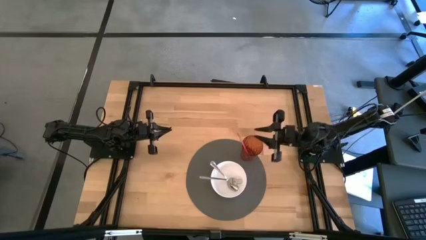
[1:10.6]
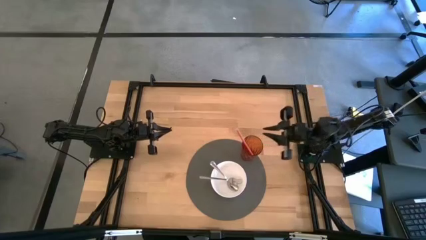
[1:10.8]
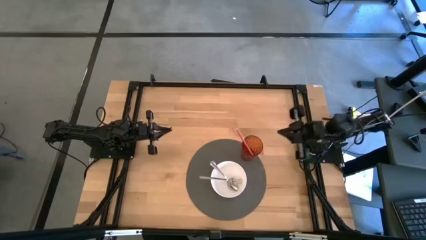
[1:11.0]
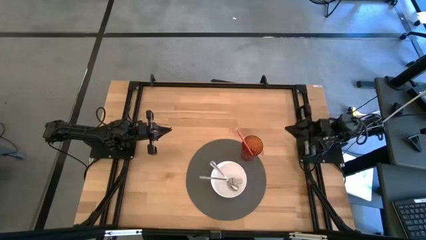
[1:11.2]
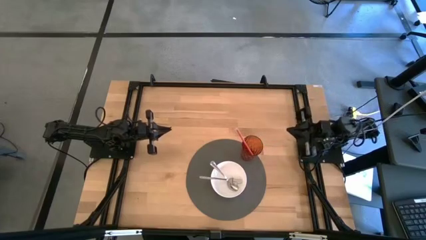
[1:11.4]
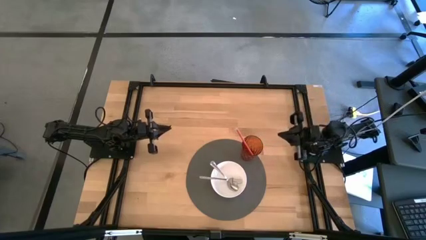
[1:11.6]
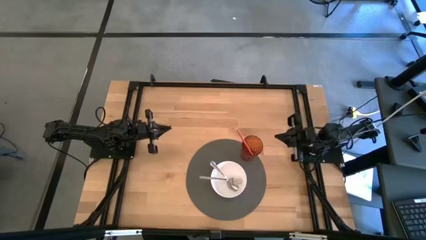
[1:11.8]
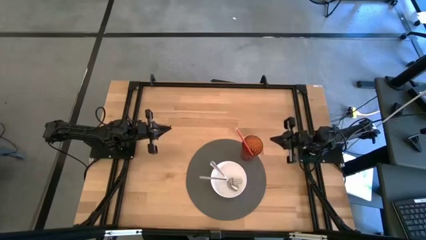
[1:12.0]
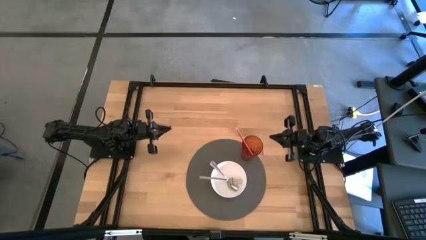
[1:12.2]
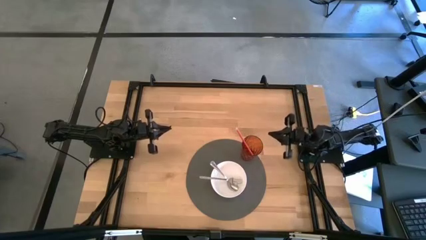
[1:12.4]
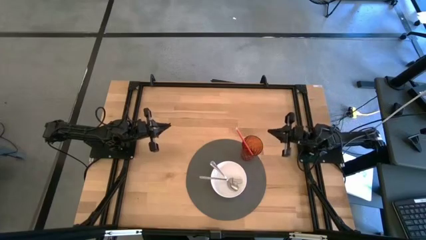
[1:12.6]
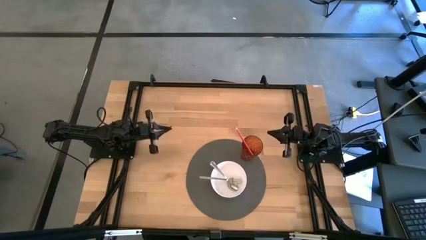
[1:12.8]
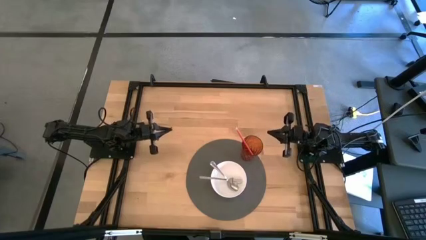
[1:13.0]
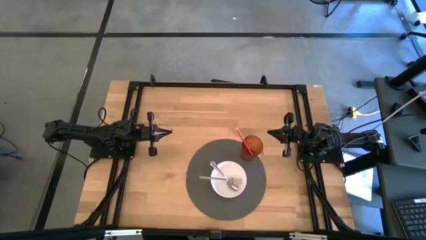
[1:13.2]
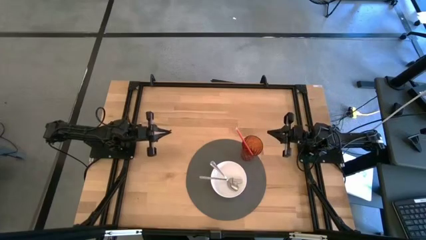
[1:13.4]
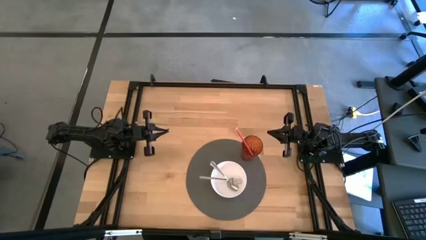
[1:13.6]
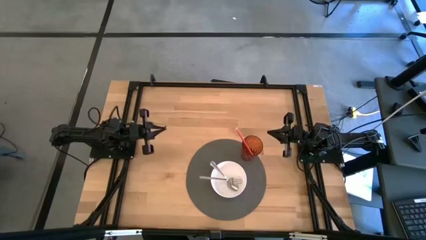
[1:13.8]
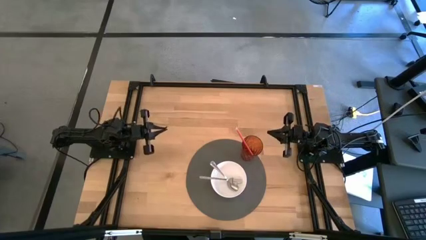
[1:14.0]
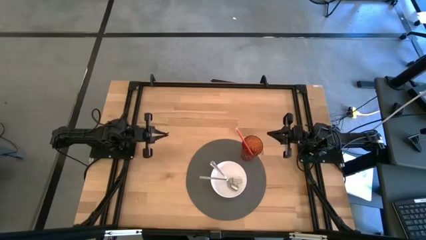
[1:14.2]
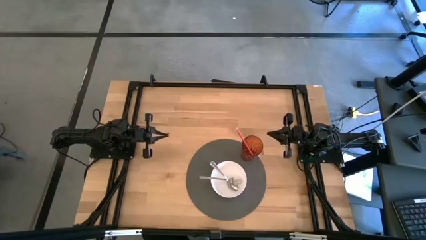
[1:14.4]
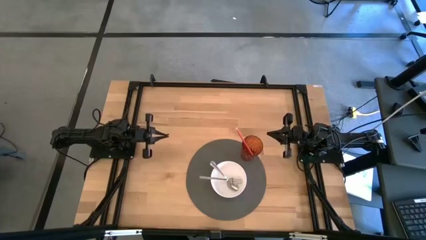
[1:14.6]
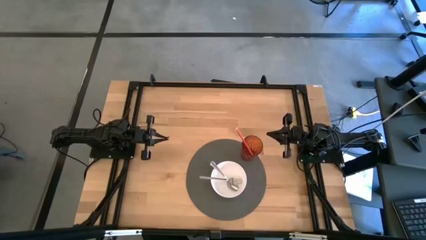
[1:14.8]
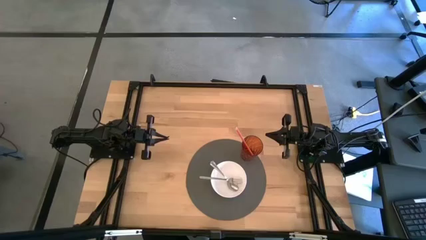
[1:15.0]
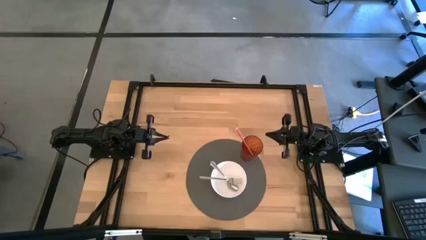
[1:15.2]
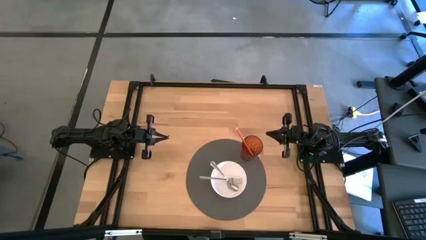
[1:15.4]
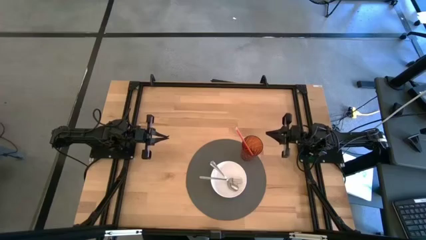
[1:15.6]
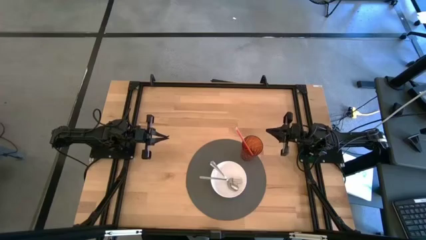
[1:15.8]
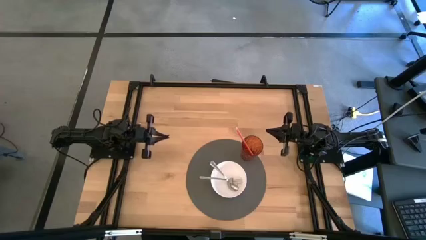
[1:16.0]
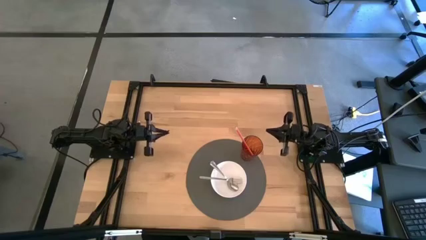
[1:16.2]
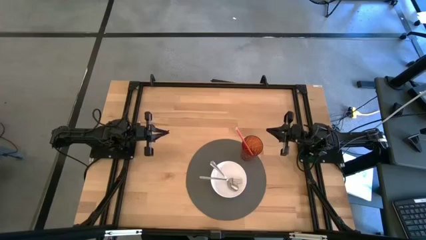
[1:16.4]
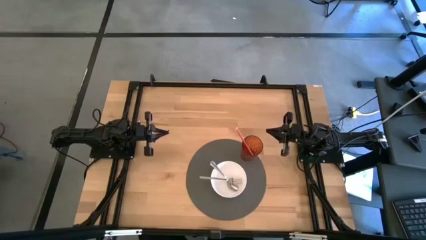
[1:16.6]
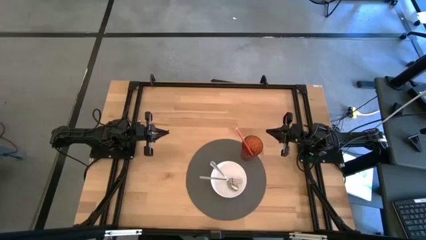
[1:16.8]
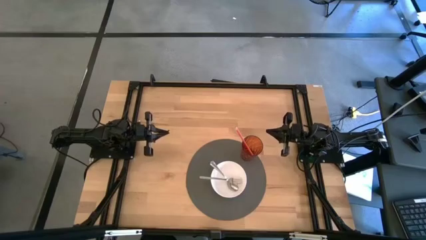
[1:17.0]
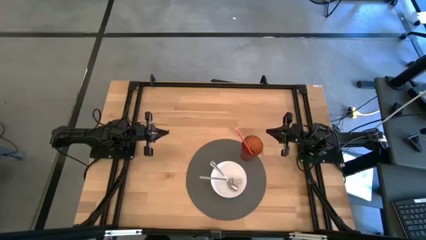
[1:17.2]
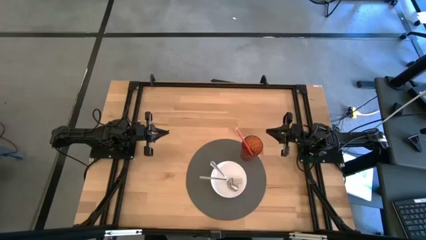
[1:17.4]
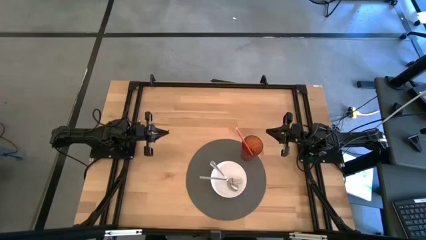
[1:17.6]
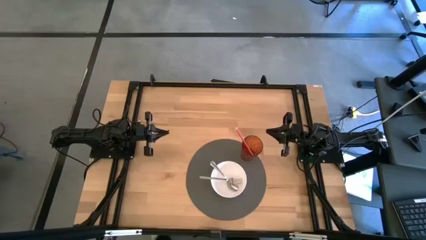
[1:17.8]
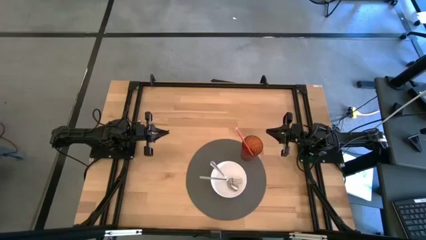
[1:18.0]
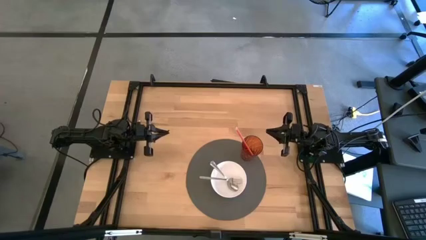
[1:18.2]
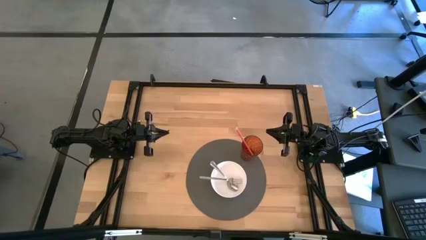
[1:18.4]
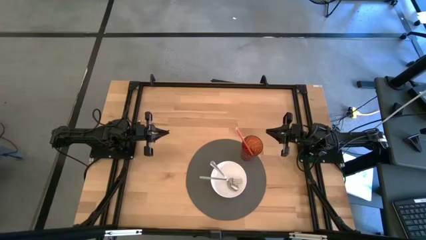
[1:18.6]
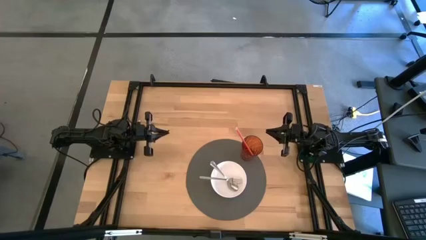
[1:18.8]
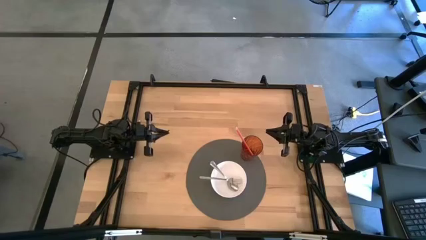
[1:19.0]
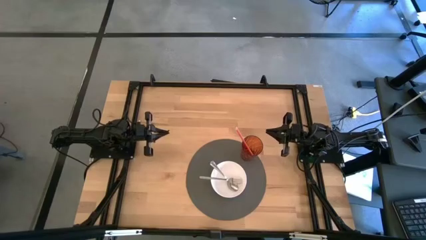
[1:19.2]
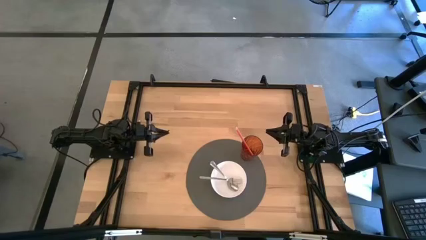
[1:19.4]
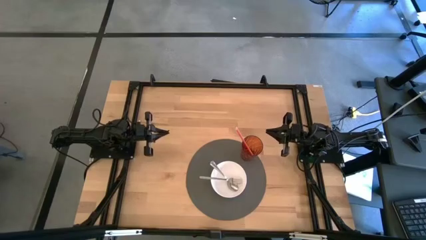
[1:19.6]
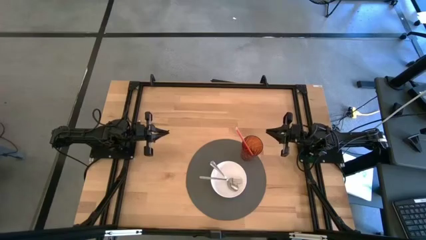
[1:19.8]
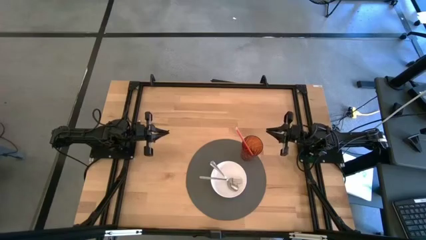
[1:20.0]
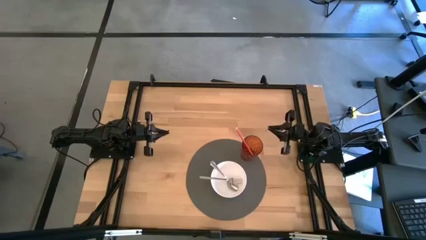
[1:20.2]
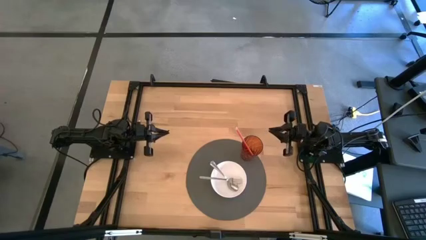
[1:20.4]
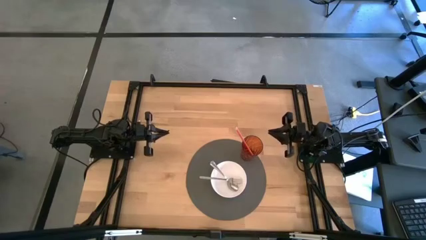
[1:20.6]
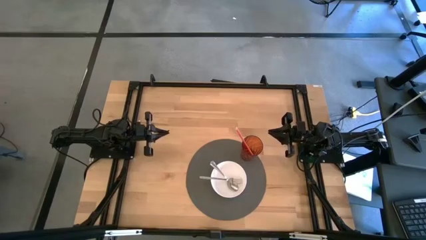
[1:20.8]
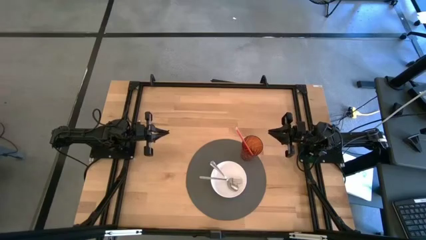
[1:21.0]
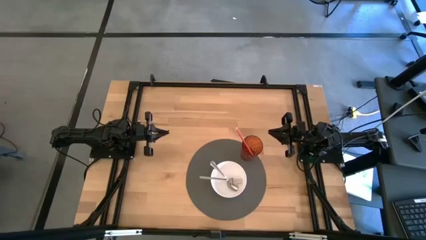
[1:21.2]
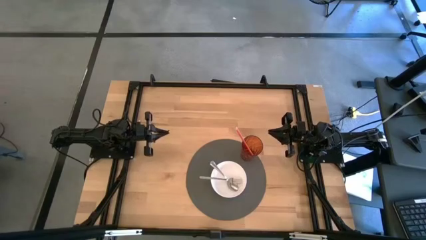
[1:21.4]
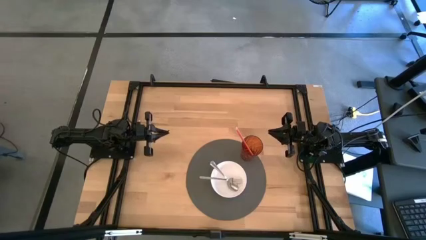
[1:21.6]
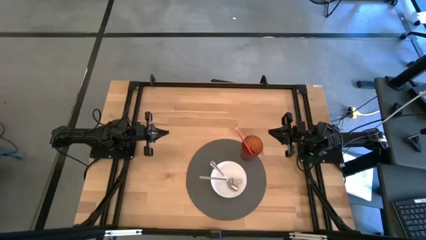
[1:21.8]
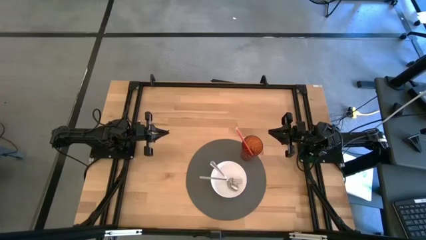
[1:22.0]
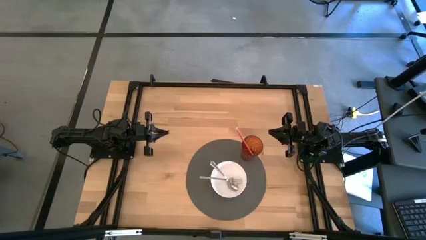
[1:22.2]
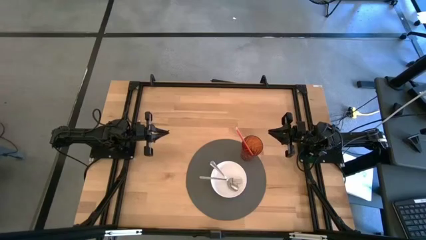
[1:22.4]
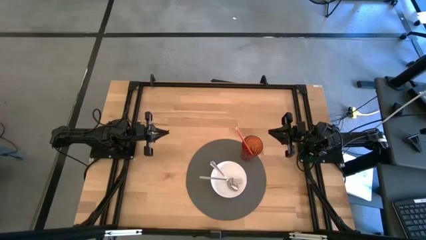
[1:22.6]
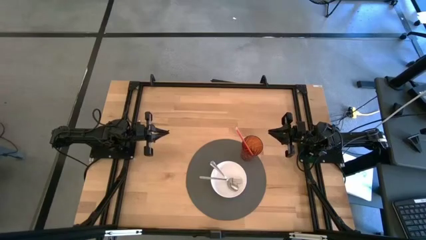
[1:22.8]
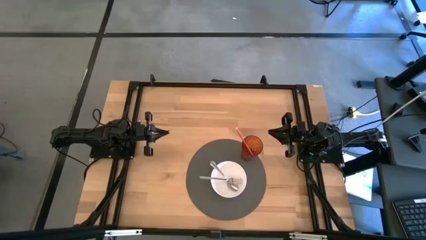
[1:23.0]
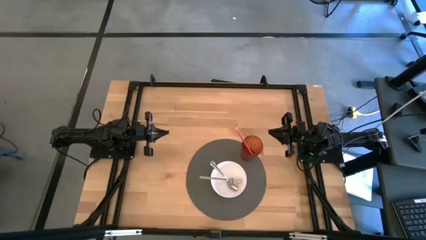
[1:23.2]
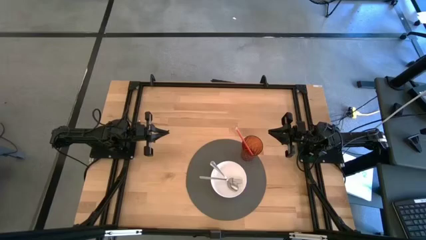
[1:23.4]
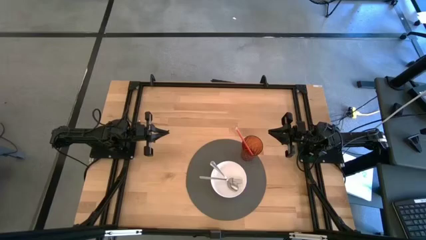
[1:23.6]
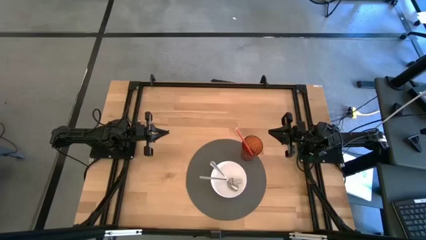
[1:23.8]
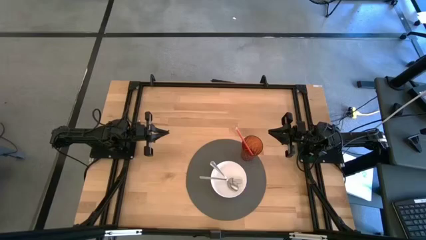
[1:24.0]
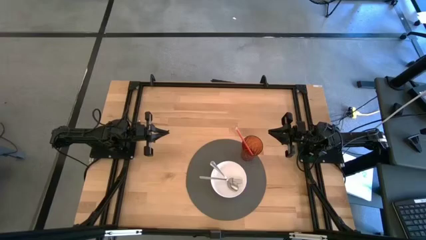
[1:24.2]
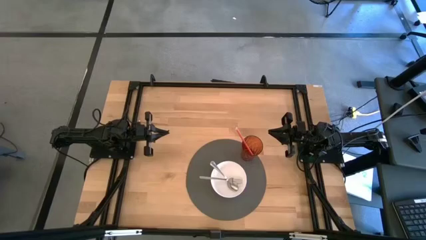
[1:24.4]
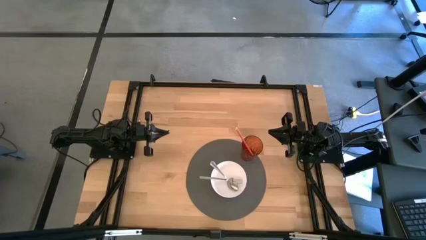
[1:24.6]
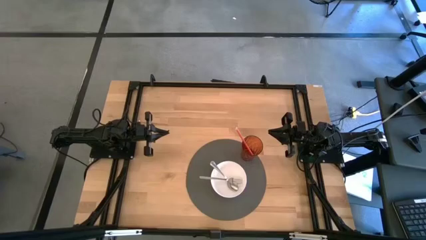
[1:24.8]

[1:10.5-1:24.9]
Task: Pick & Place Utensil
Return to Home Position

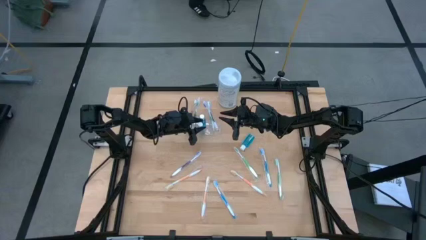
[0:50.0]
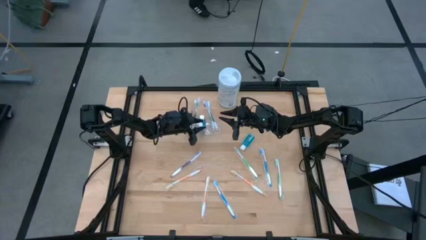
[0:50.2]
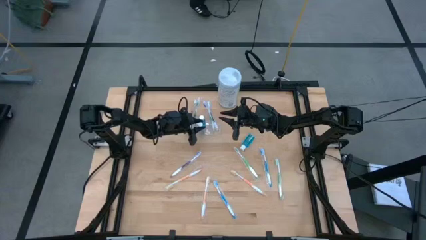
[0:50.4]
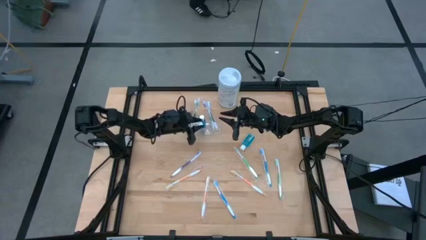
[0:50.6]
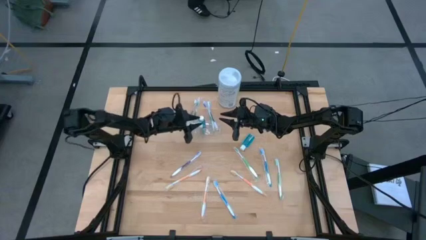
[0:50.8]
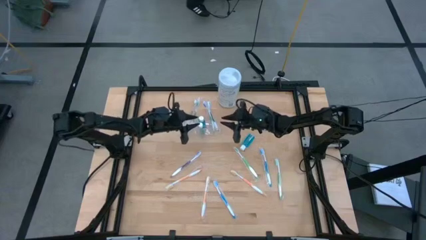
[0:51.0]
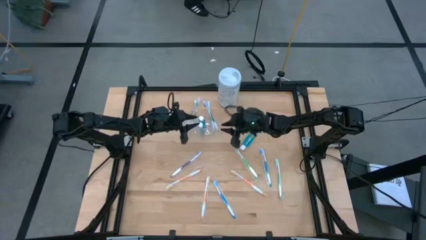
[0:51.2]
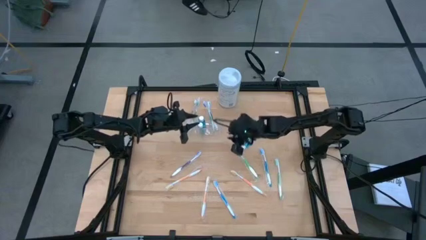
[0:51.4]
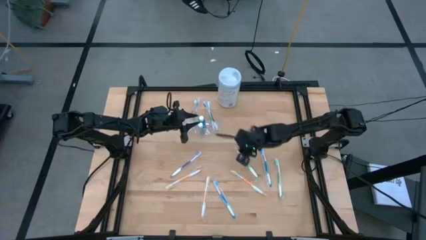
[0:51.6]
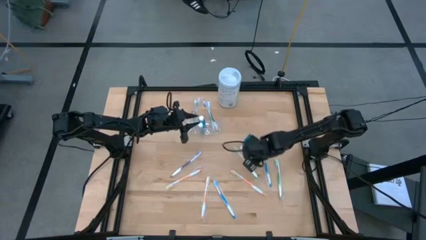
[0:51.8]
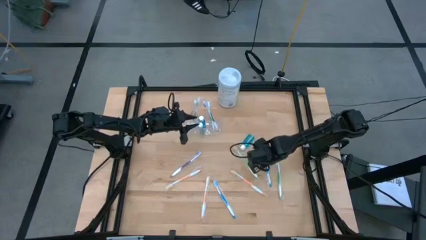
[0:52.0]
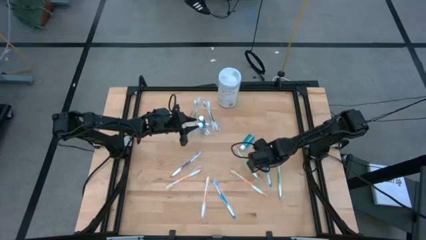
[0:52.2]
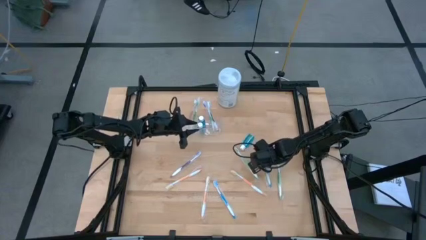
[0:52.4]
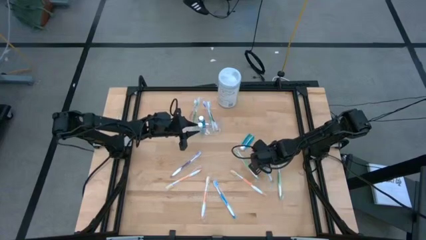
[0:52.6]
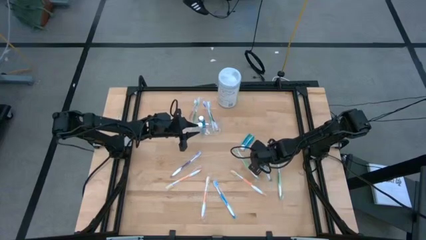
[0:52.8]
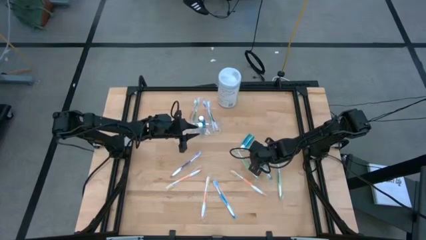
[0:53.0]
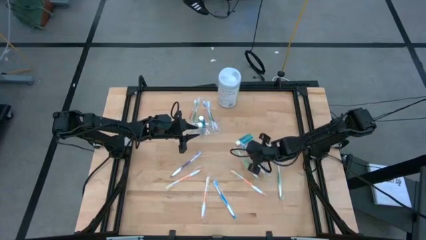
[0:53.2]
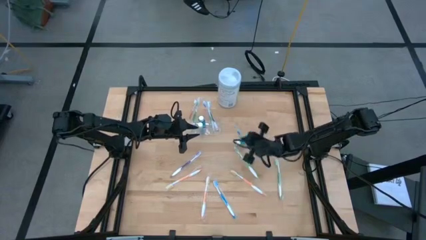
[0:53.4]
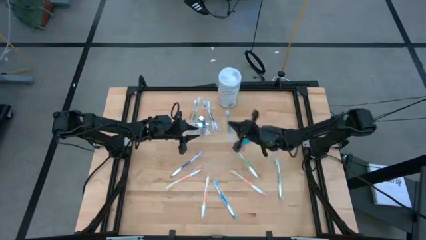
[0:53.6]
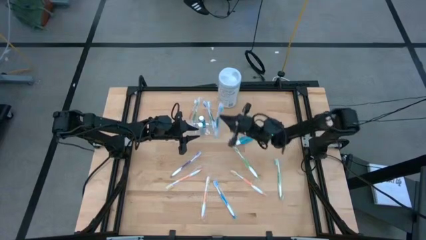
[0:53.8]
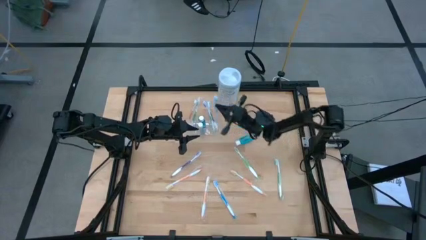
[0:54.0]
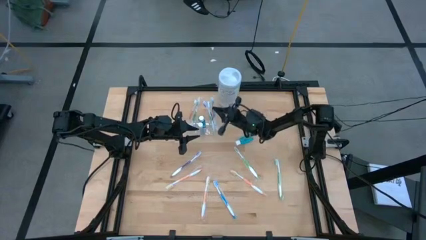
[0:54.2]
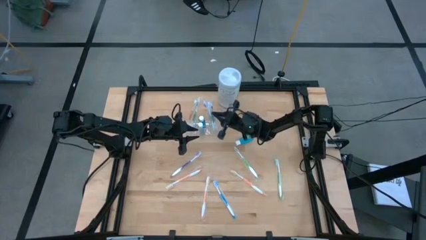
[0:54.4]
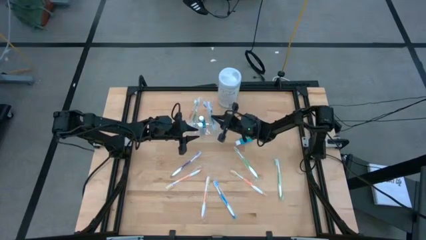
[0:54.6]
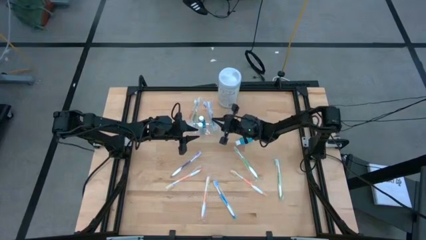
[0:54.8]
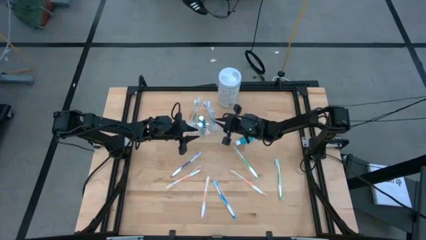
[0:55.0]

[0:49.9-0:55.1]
Task: Pick & Place toothbrushing station
Put the blue toothbrush into the transparent organizer
